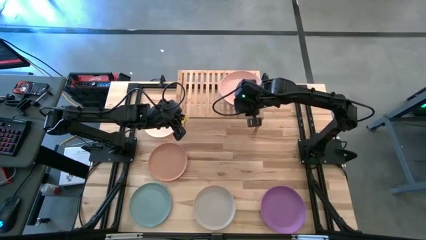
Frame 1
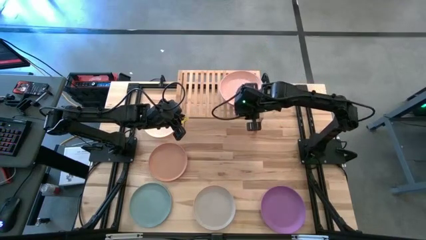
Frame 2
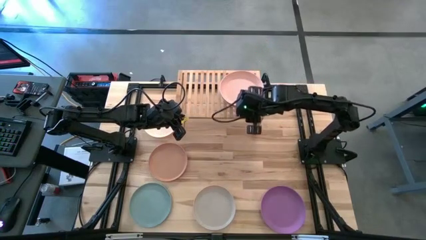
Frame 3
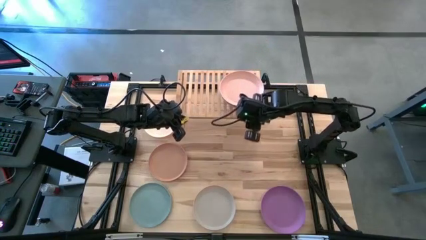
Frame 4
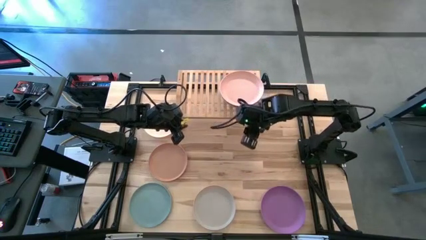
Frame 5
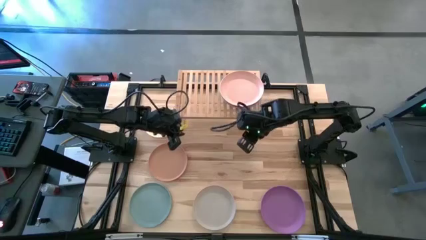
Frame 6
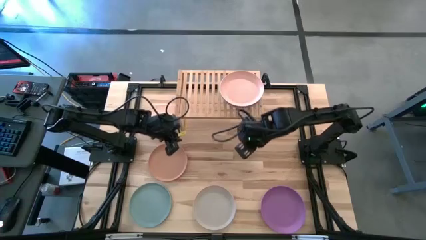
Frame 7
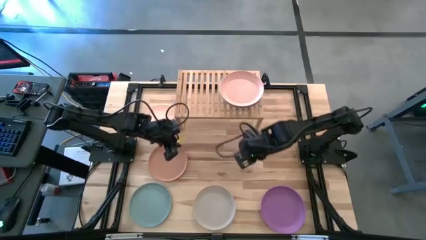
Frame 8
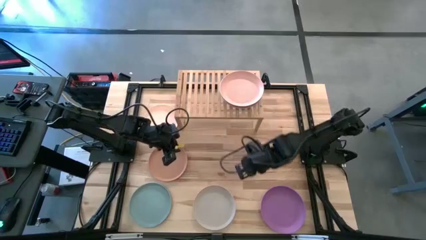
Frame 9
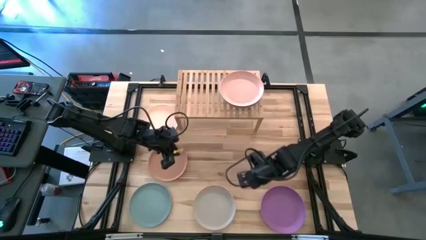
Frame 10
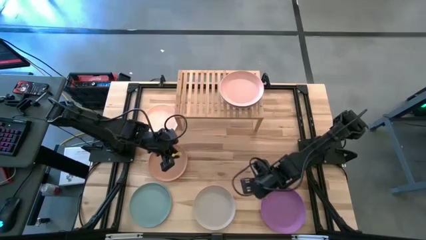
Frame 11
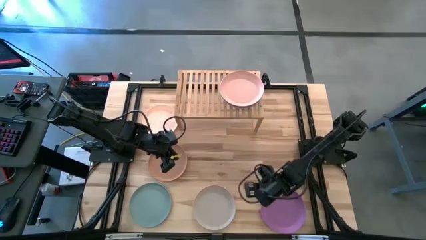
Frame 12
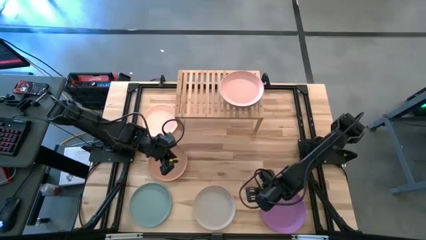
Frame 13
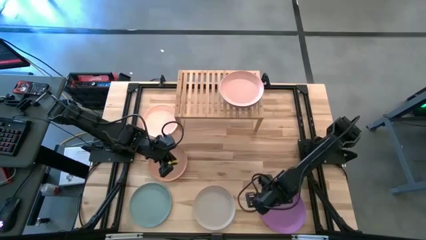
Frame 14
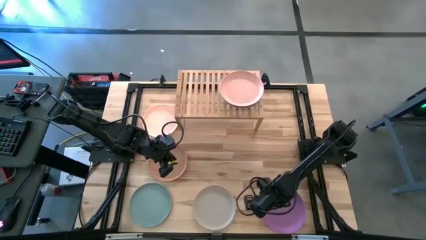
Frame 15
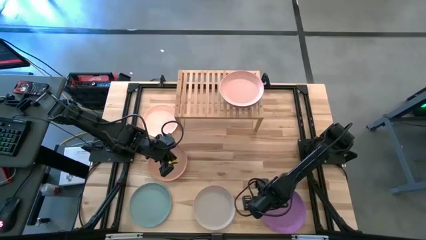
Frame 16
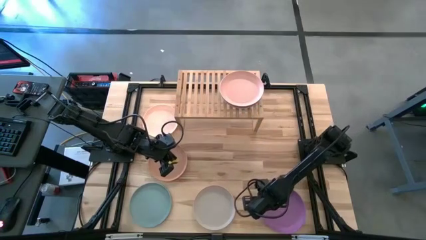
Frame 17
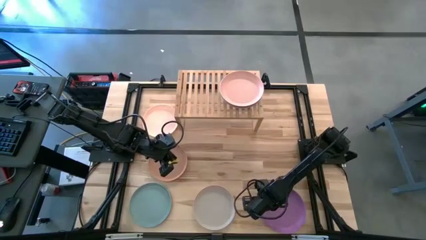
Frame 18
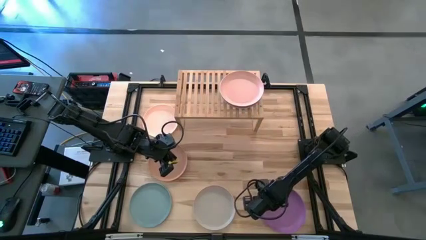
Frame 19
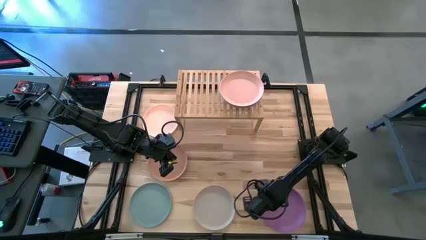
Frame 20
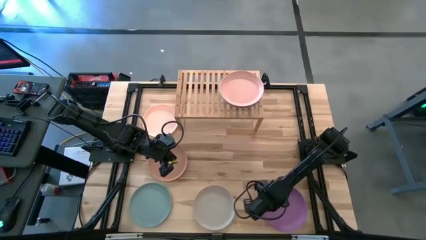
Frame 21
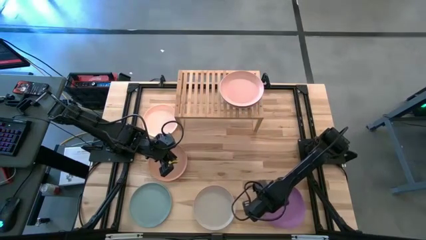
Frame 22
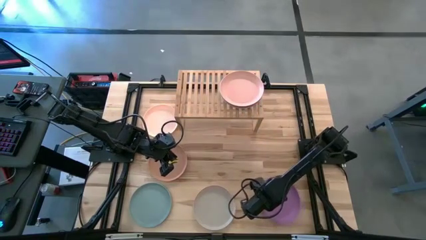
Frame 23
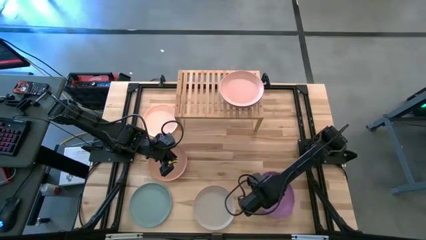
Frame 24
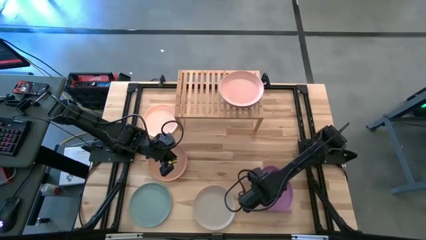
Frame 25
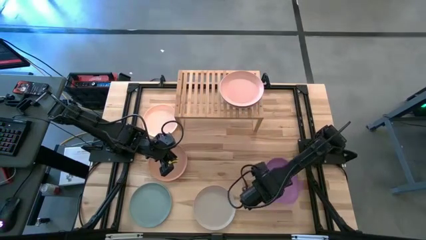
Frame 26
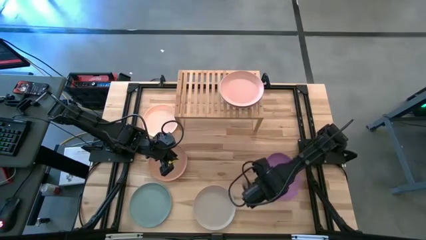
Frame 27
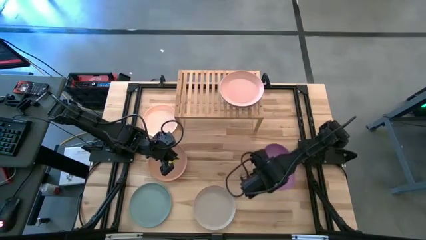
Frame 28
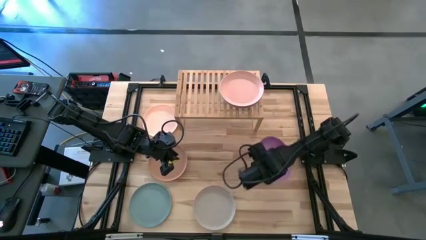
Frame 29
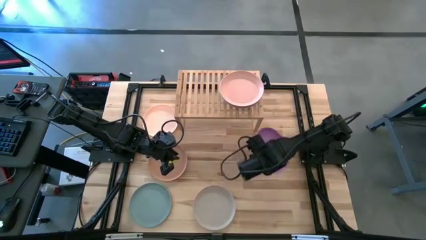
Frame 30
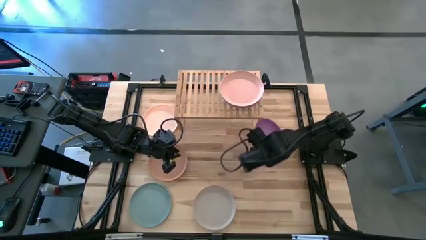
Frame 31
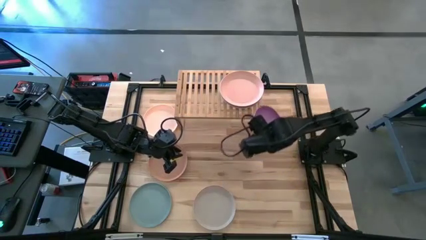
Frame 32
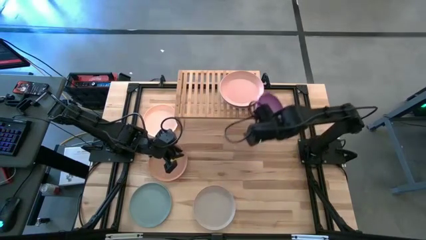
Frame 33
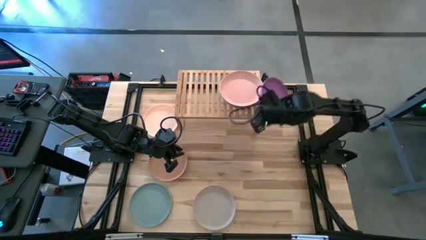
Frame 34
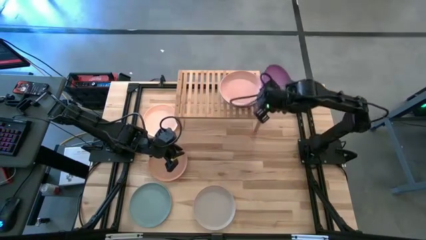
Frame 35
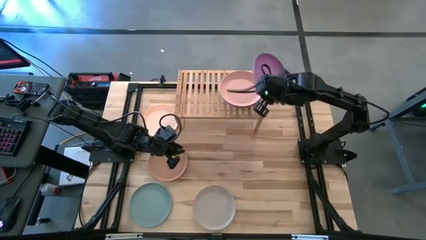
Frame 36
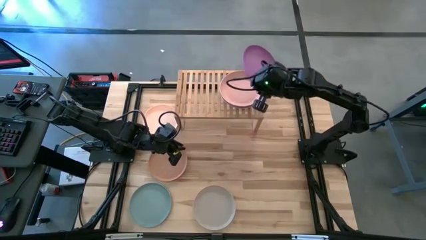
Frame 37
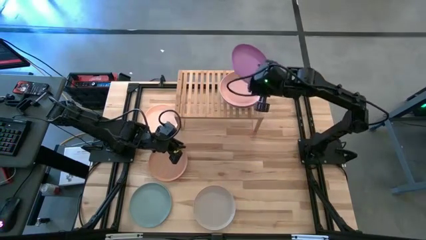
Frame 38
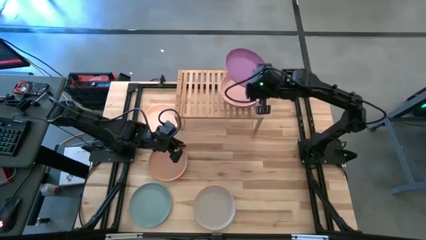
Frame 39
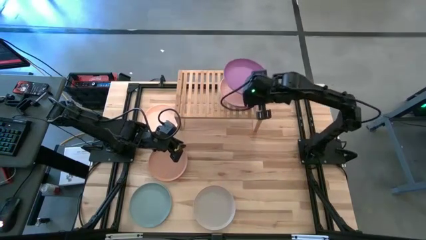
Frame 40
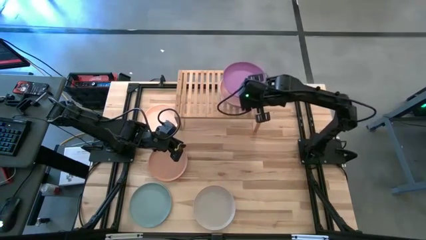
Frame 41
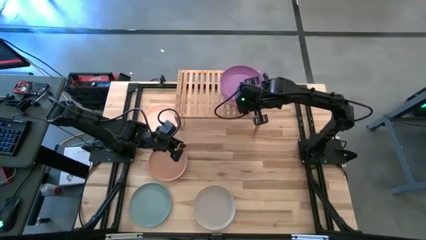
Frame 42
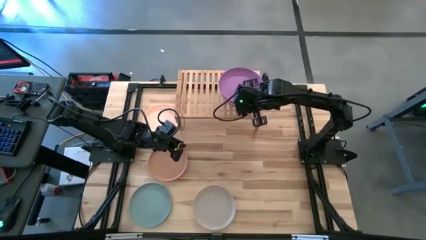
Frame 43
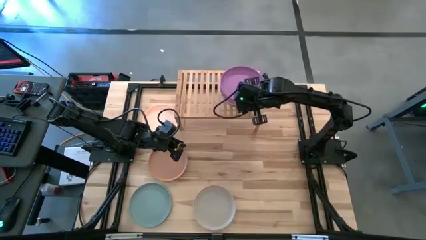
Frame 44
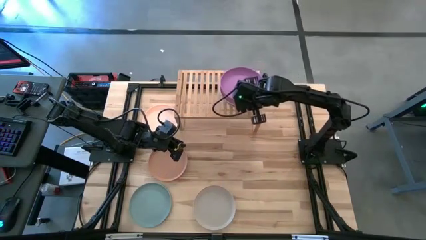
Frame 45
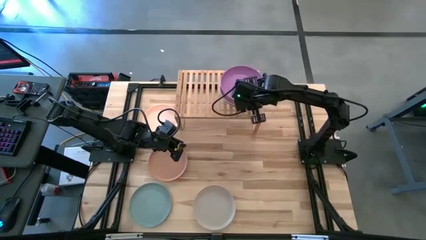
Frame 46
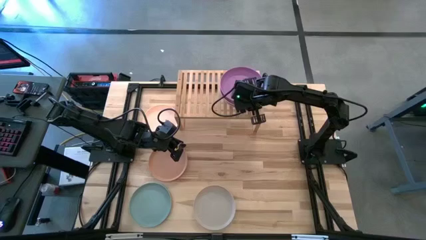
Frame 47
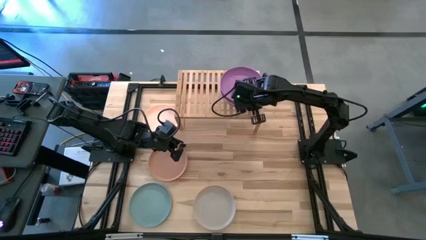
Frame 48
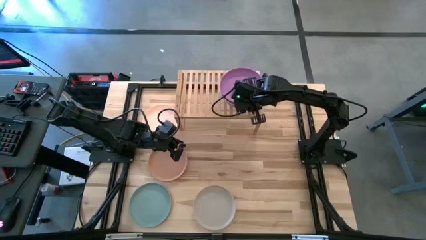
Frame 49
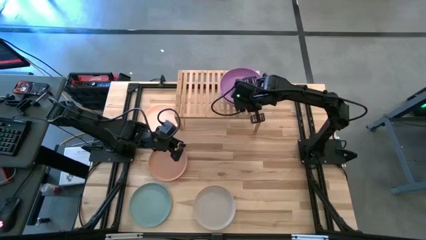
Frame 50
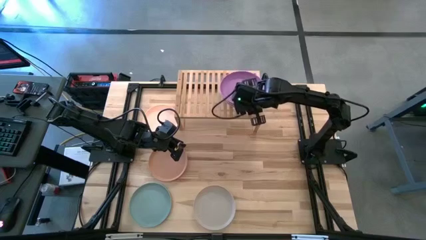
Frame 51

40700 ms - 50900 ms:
Task: Place and stack plates onto a shelf
Stack the purple plate on top of the light orange plate on the shelf

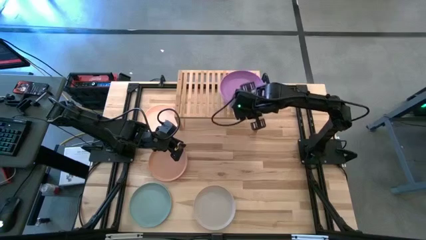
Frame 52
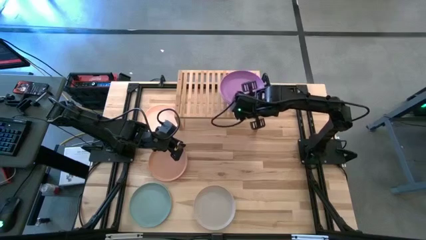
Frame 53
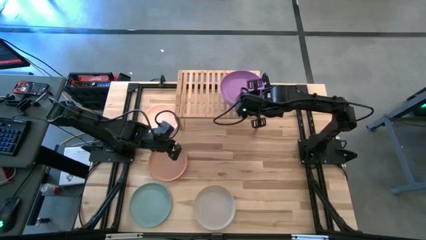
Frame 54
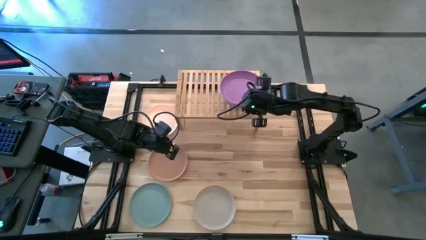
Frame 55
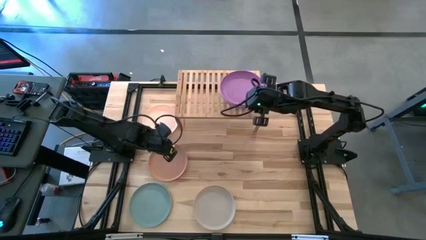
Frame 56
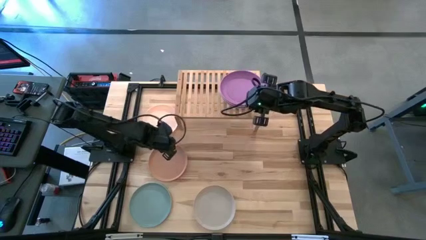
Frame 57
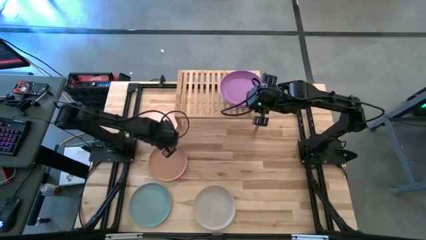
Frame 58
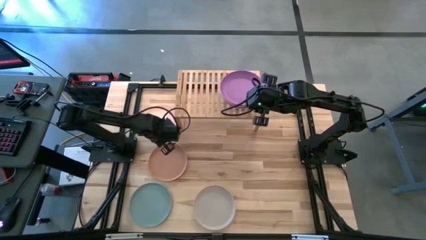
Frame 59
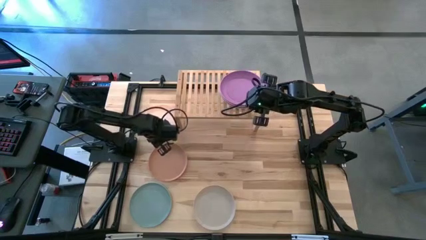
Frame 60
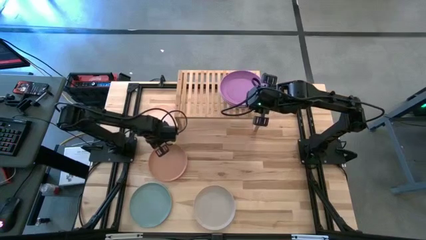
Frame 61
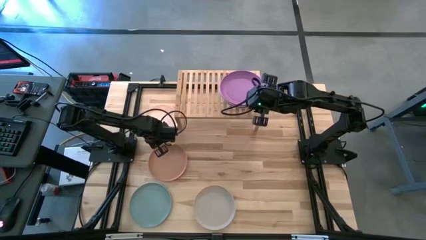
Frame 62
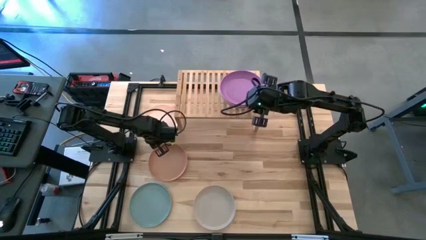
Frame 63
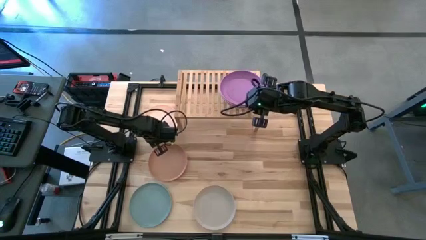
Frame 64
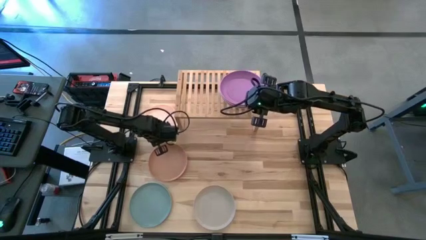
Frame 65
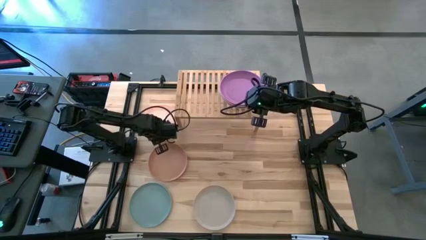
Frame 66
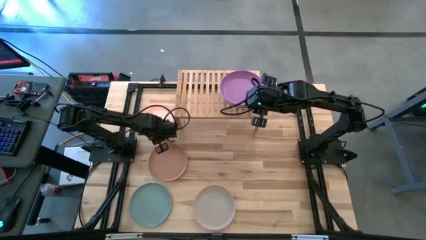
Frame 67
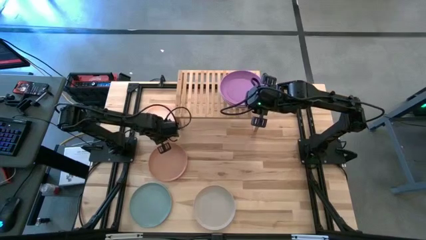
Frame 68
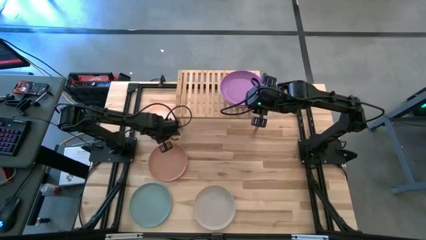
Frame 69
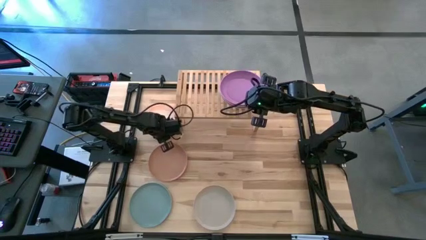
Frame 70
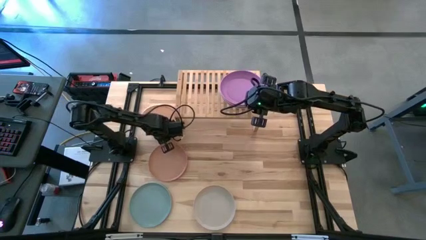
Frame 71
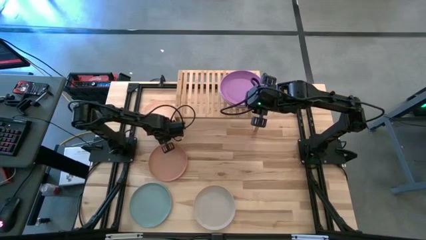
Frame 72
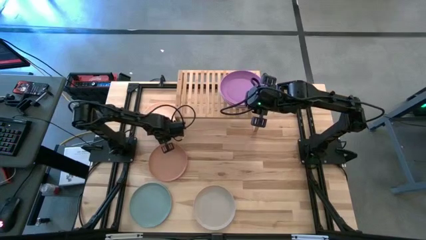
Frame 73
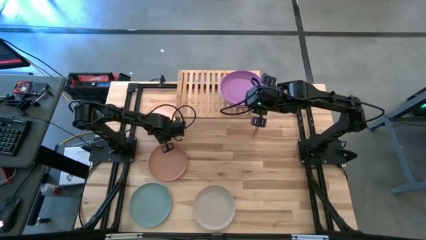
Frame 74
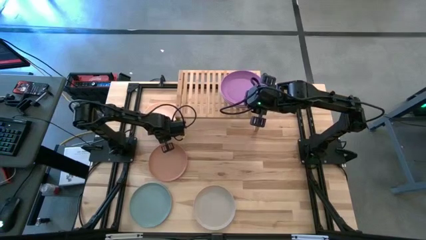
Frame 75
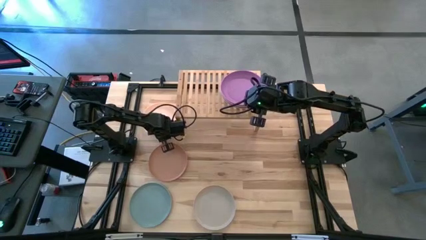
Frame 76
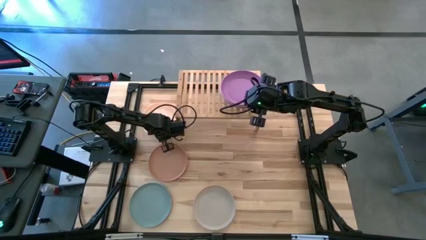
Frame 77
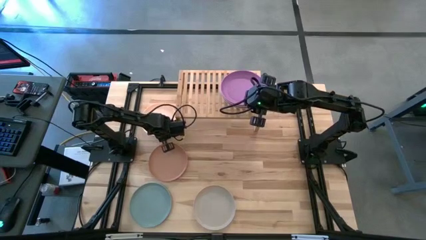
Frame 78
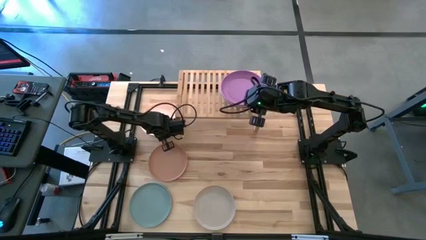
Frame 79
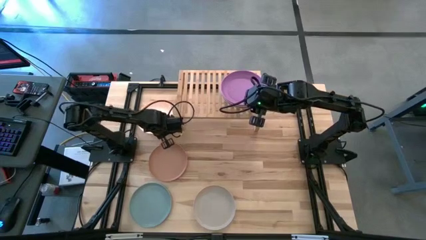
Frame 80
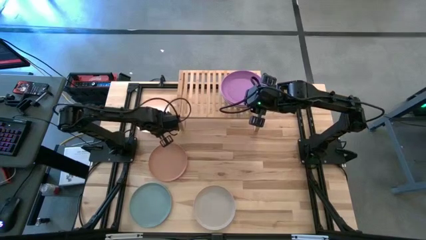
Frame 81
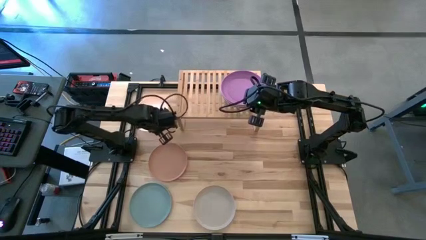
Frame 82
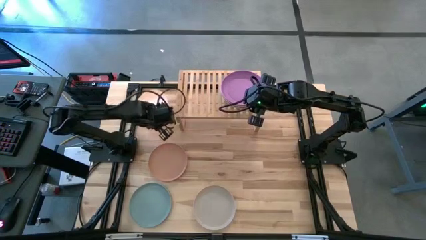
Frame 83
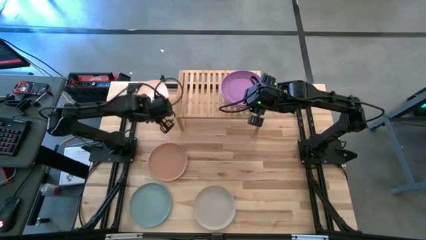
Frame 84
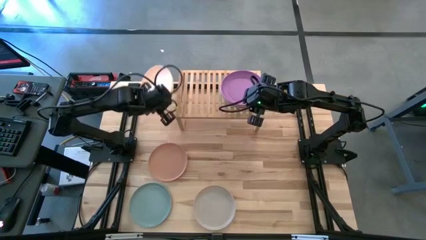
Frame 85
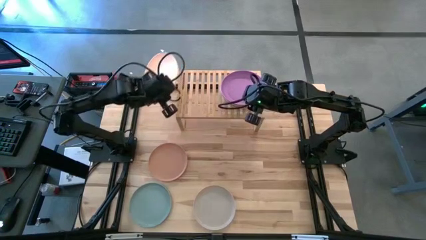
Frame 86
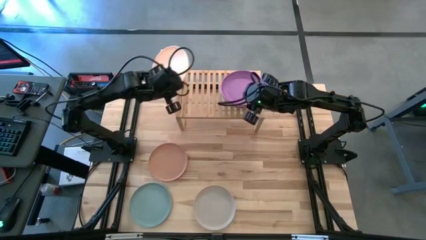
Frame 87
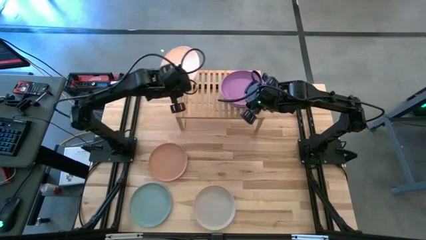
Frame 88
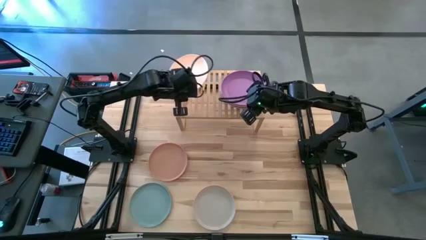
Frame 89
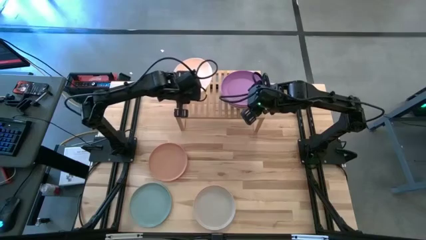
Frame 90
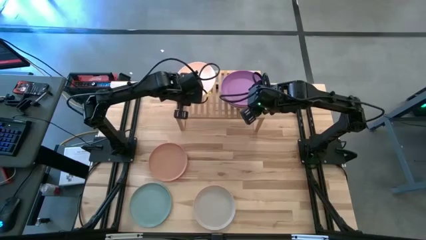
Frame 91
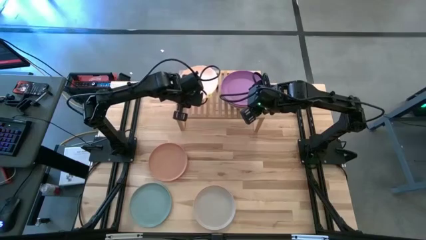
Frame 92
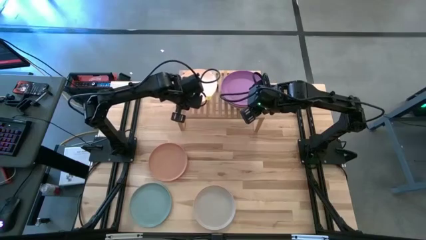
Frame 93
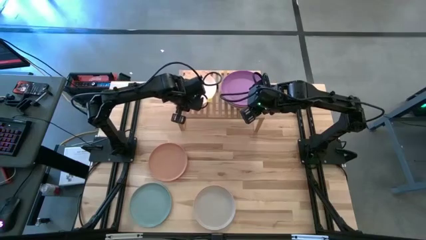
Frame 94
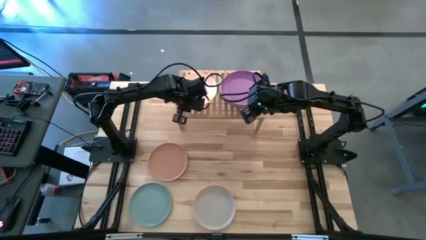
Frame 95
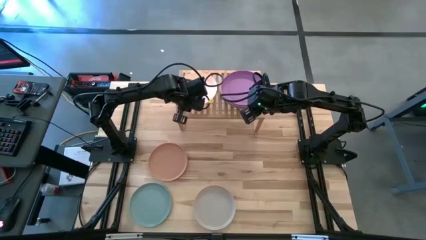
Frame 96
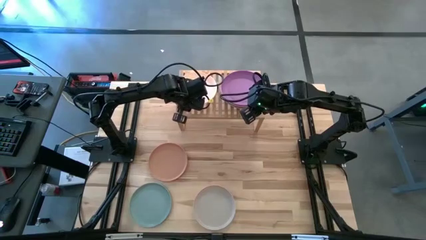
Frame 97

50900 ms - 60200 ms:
Put the white plate on the shelf
